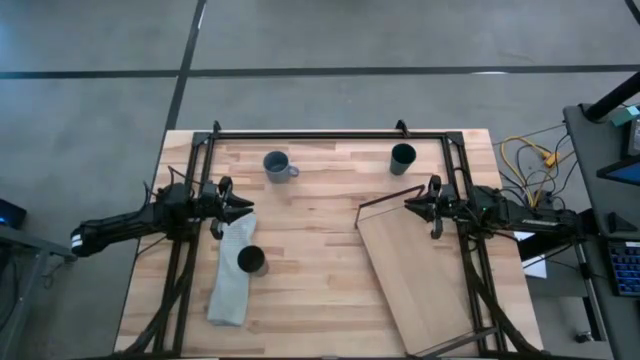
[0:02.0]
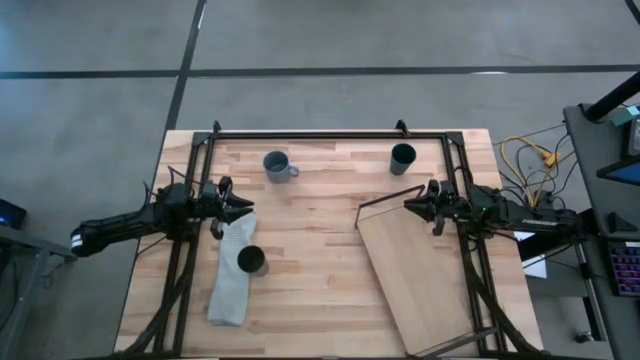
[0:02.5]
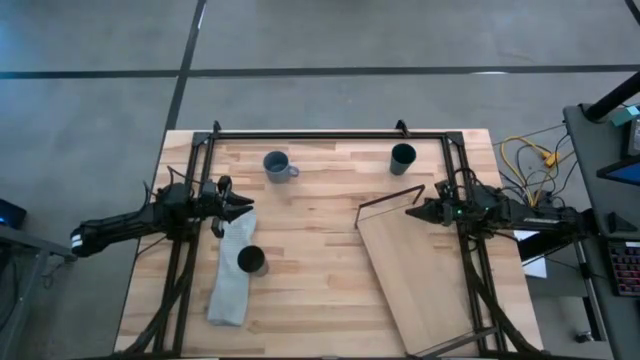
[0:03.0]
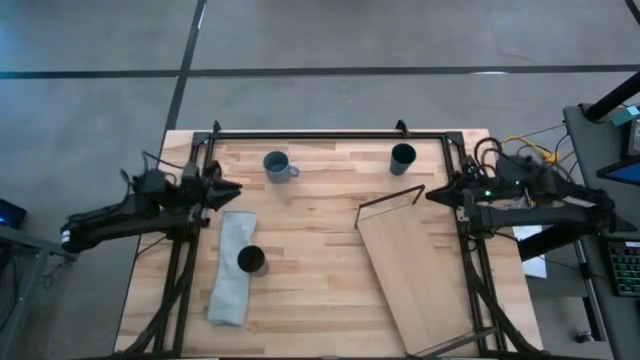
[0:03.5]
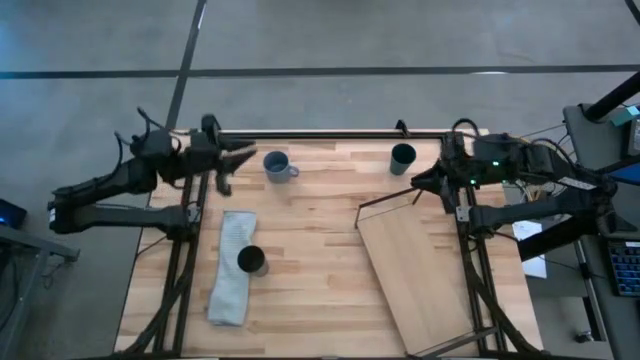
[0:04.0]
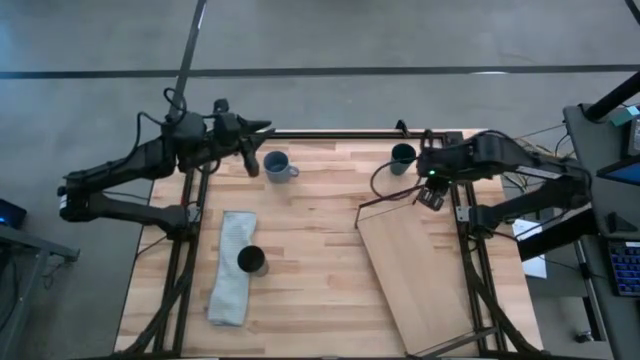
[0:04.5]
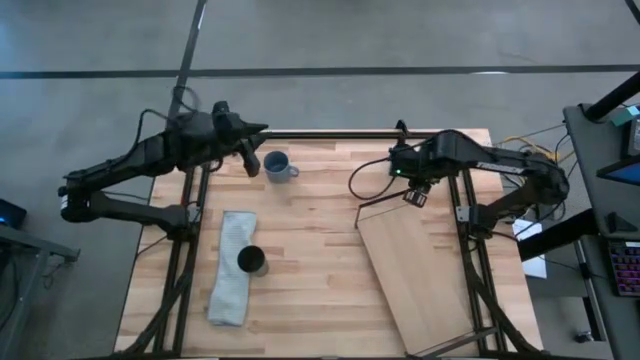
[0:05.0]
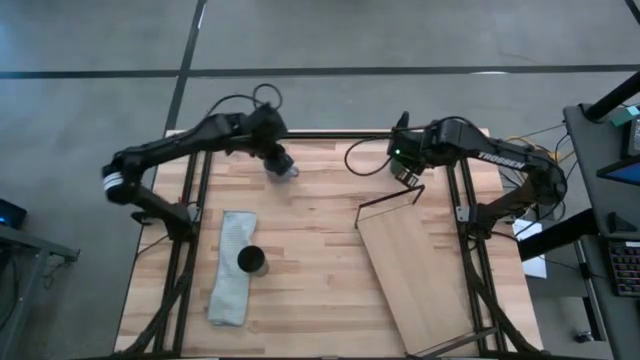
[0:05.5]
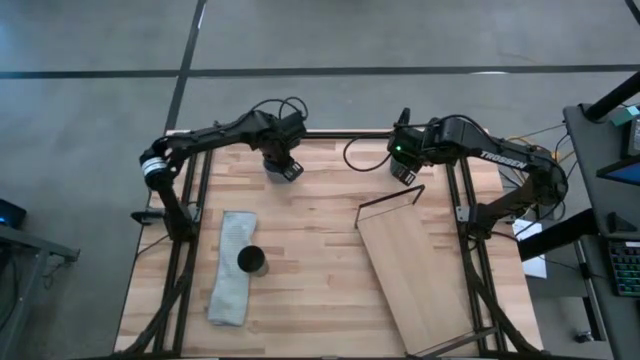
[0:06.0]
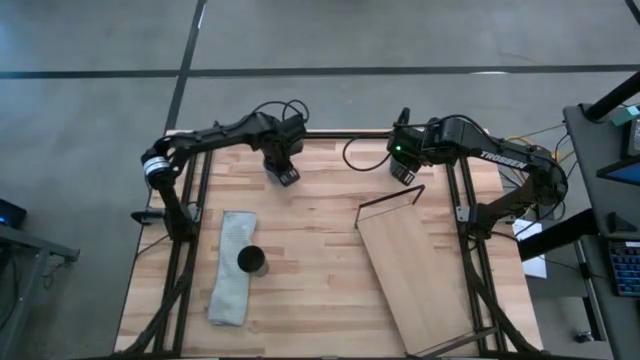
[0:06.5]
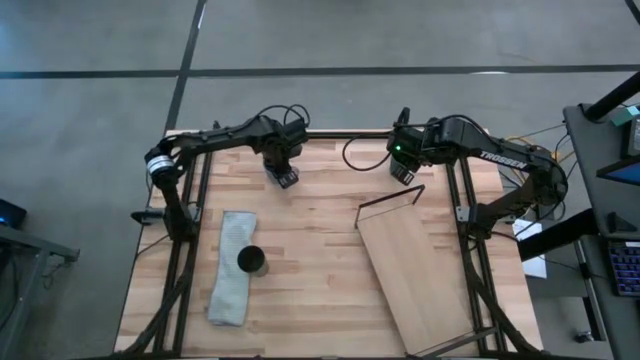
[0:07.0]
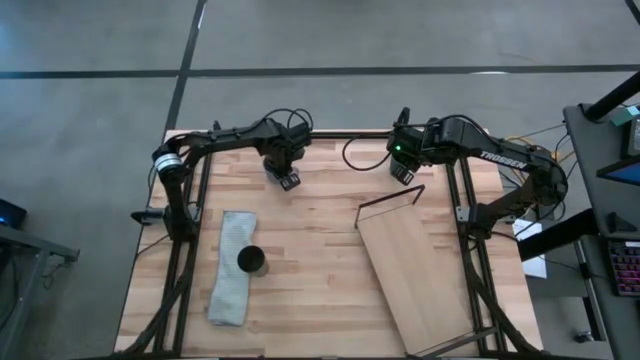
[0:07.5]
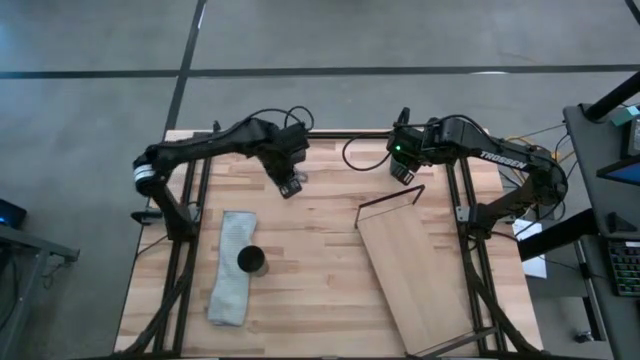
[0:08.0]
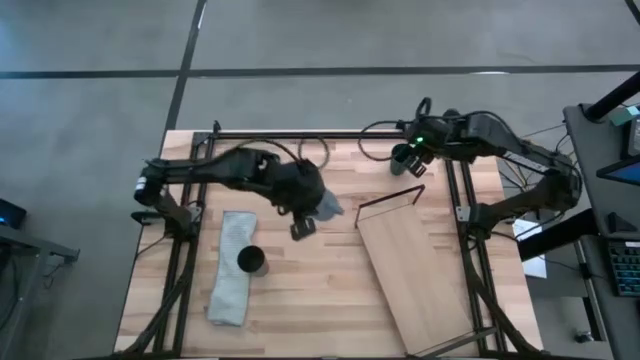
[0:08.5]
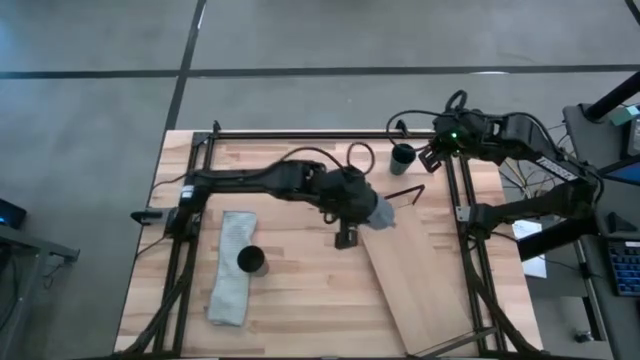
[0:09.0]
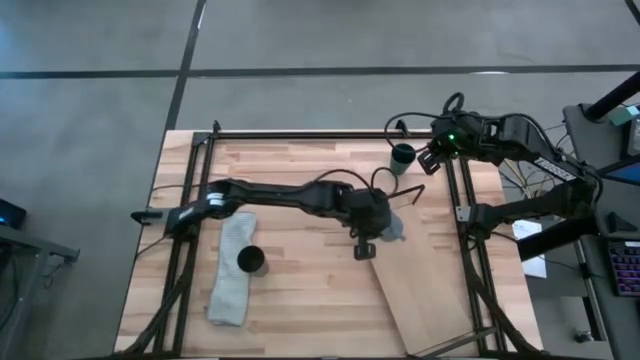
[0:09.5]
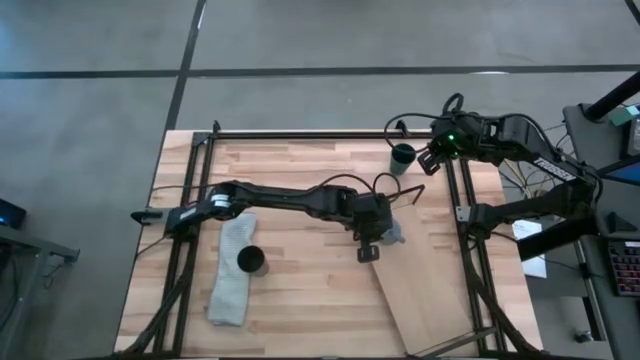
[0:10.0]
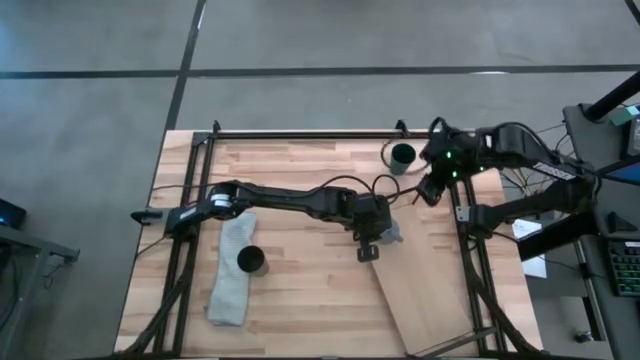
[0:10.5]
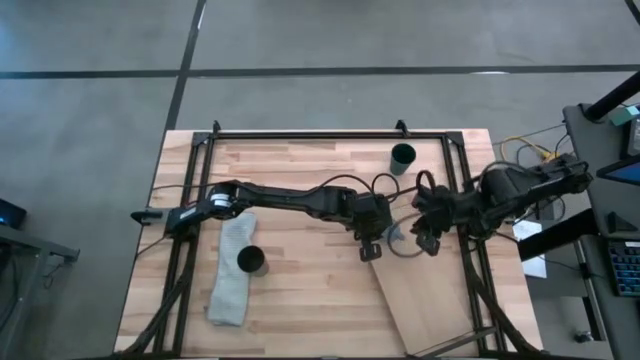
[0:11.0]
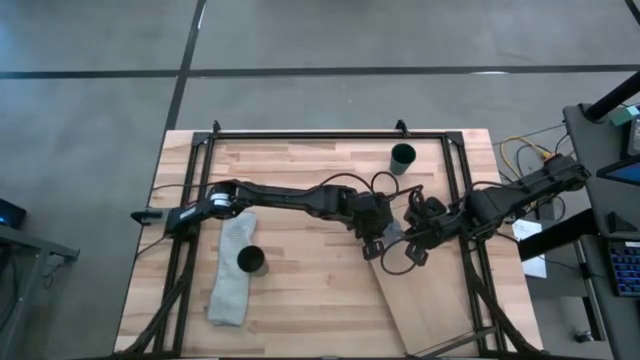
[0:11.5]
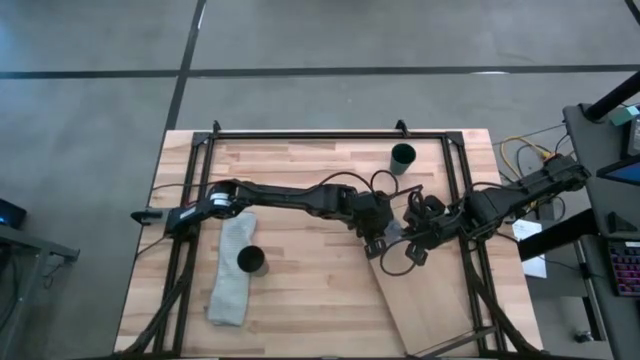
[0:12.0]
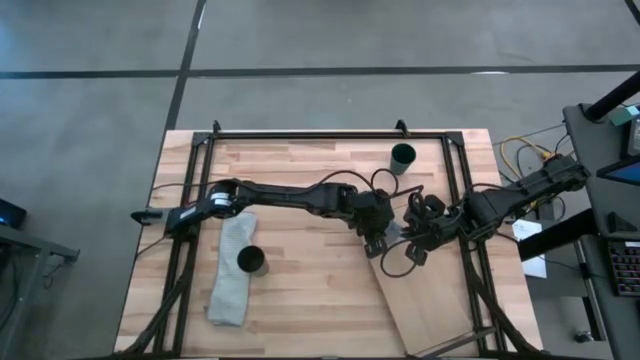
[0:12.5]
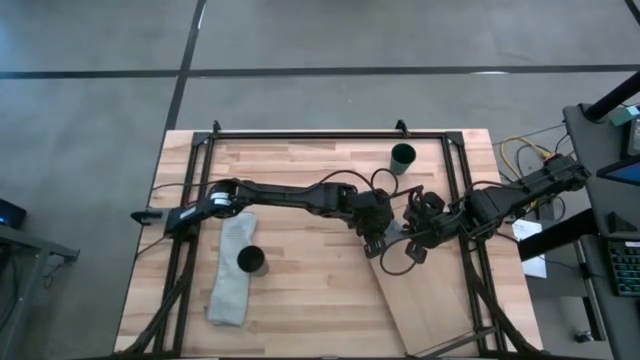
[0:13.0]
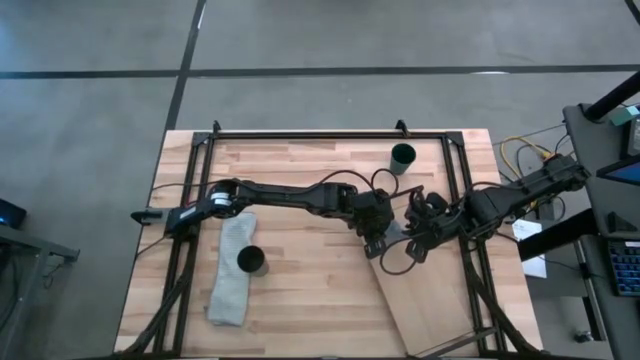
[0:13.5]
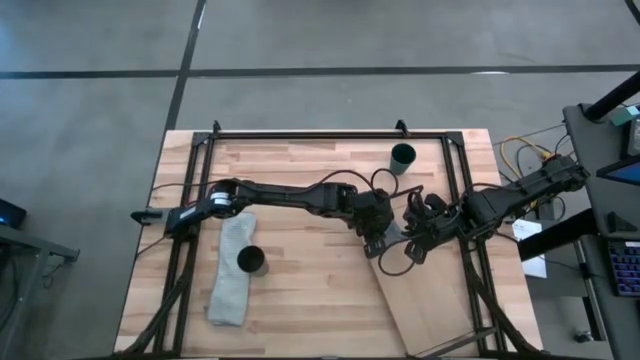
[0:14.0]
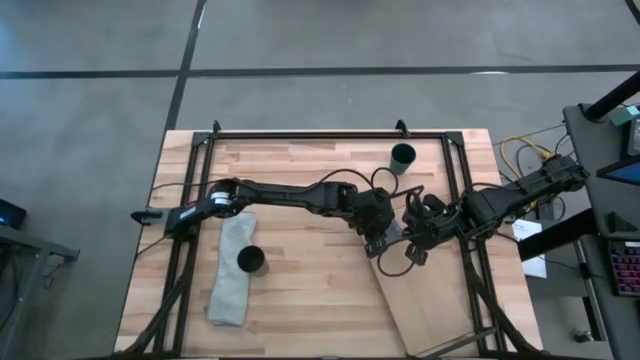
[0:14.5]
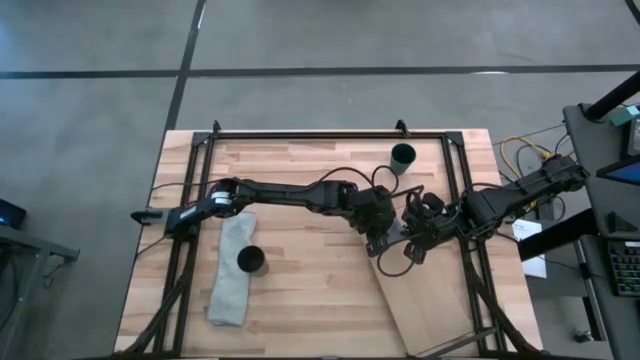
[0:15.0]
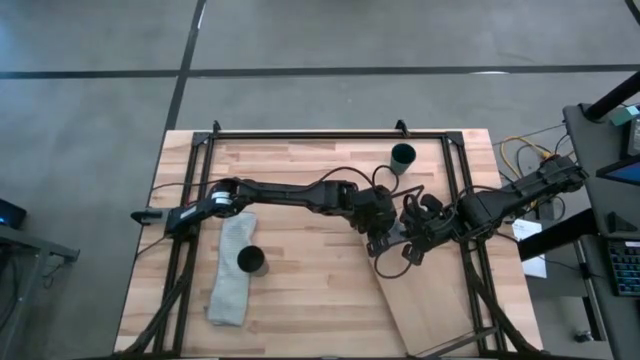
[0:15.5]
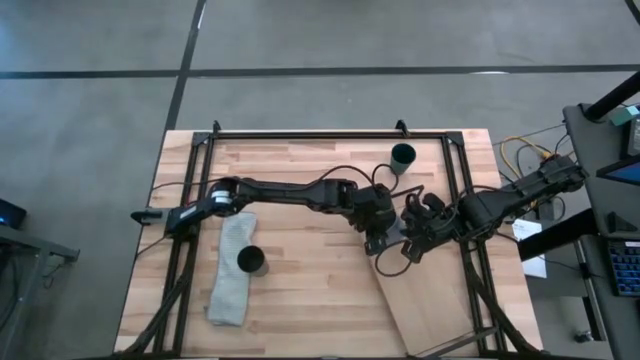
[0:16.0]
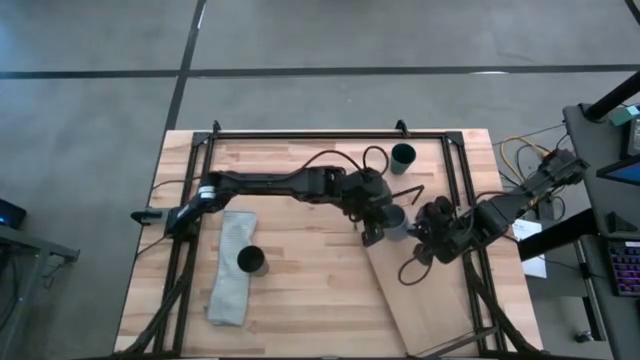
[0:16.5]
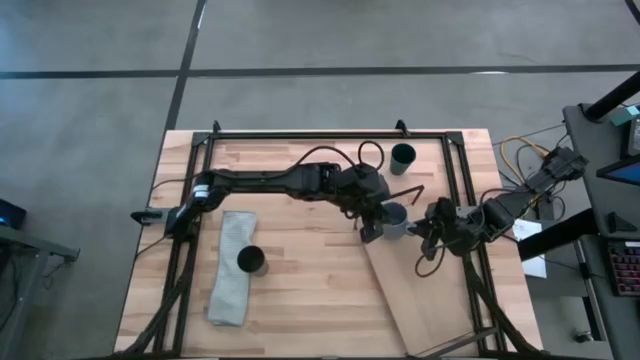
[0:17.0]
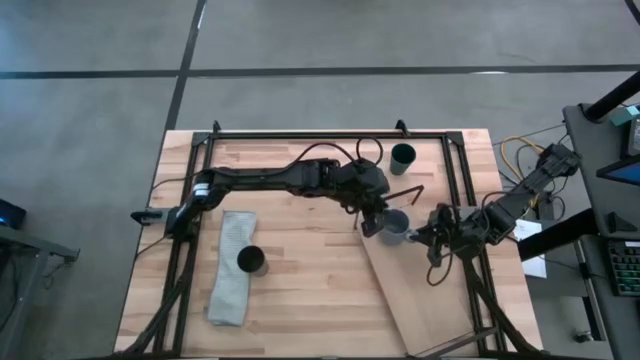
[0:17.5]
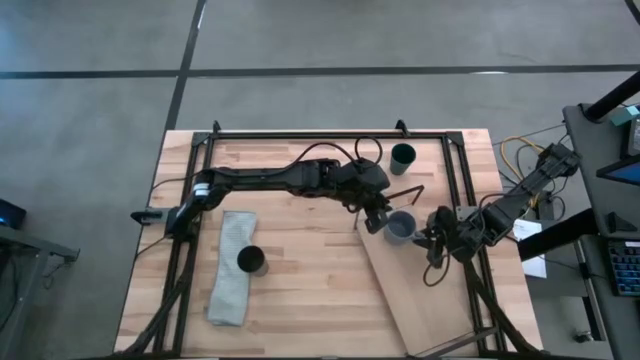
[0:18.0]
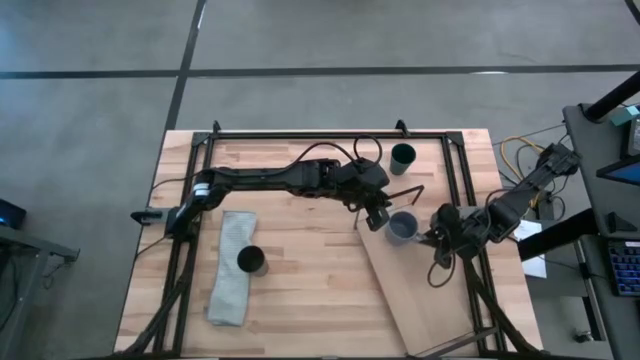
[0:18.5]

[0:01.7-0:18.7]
Task: Stack small to large cups/mugs on shelf
Put the blue mug on the shelf

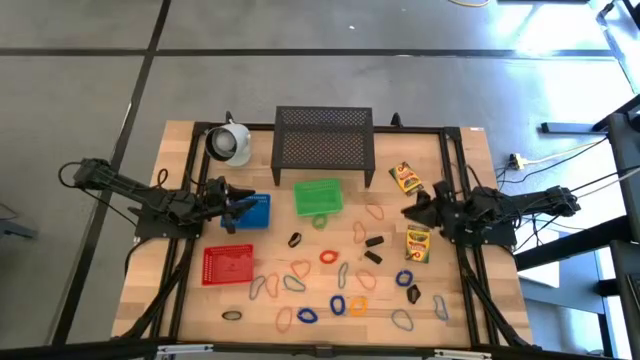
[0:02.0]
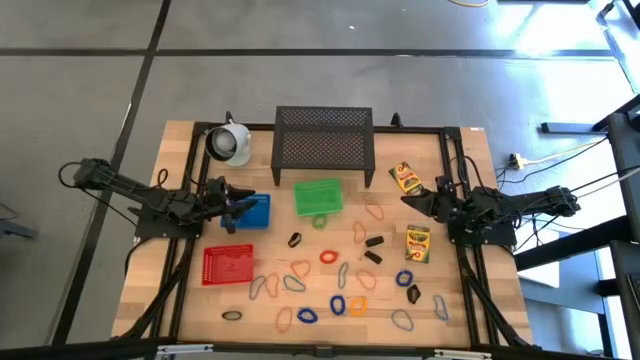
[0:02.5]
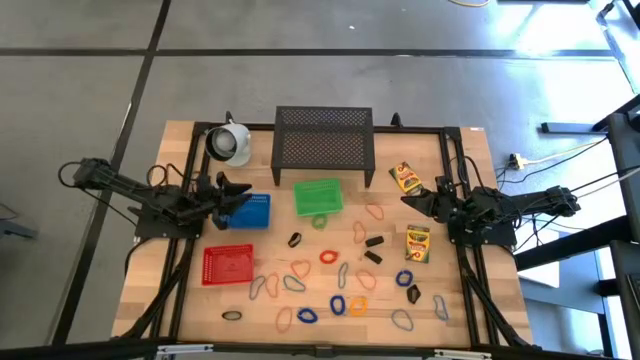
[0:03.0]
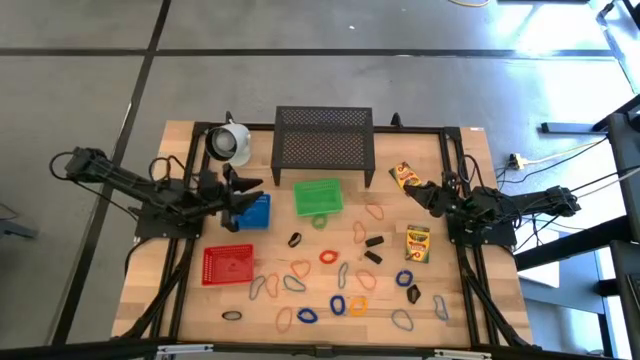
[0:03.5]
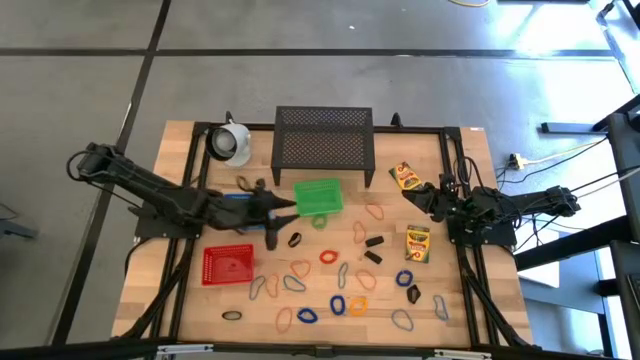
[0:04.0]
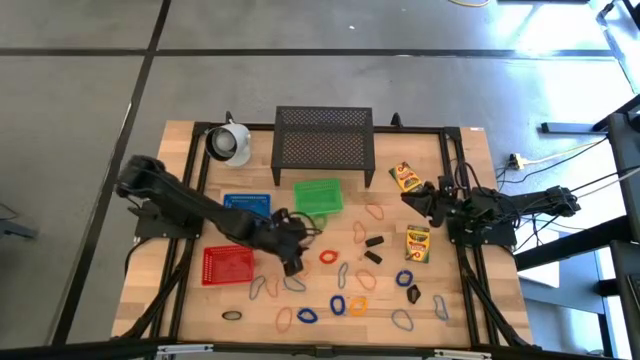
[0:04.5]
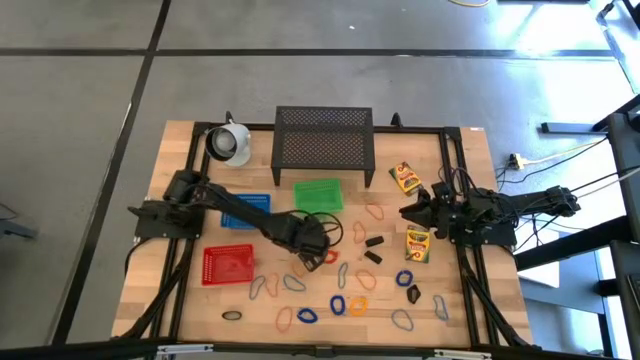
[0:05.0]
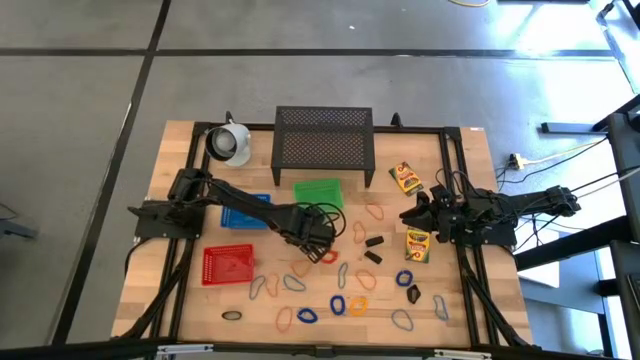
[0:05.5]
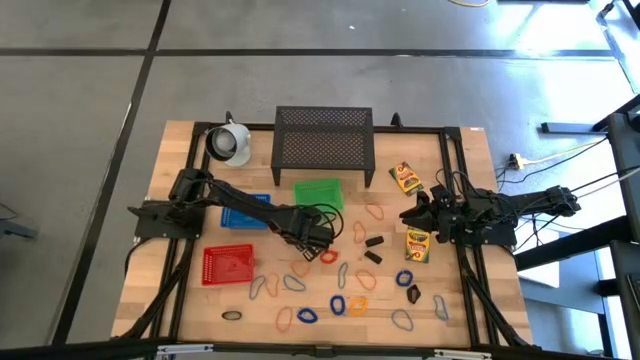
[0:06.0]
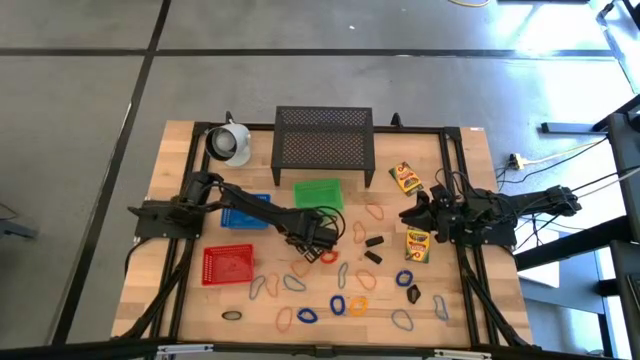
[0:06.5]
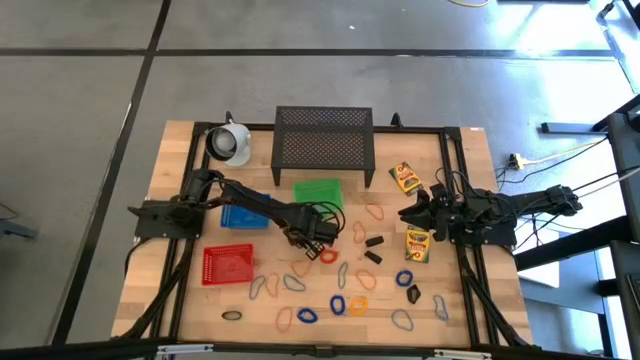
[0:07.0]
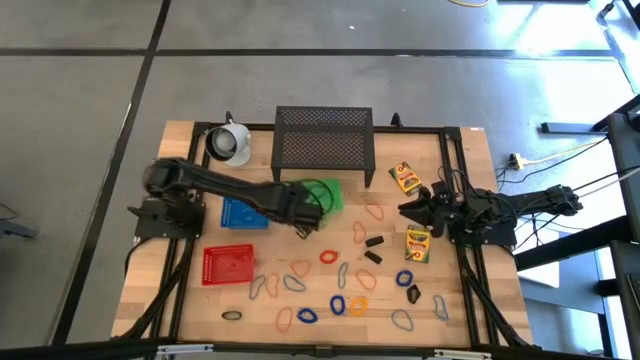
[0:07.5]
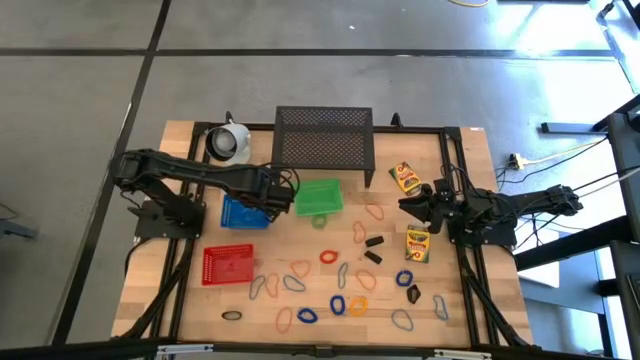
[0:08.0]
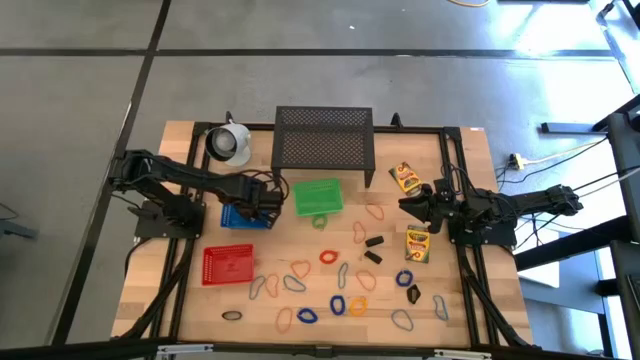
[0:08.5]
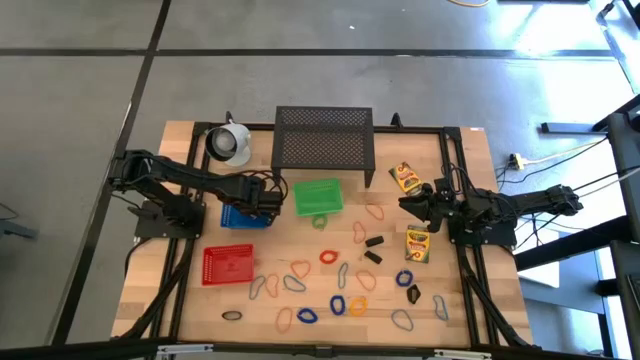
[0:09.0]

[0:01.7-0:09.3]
Task: Pick & Place Office Desk Supplies
Put the black rubber band into the blue bin
